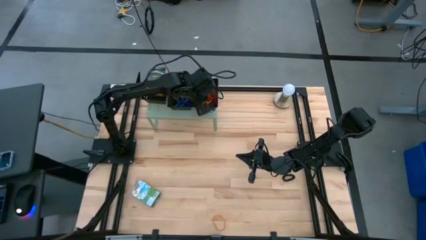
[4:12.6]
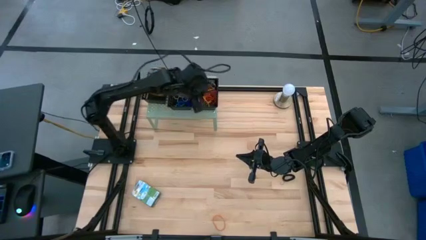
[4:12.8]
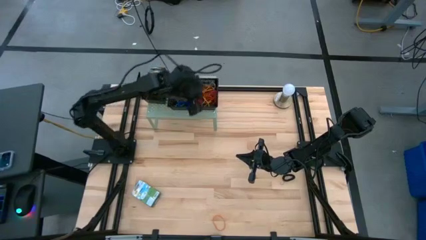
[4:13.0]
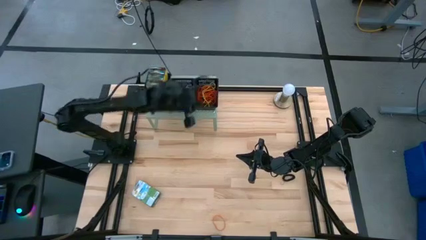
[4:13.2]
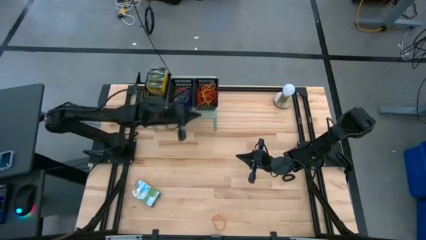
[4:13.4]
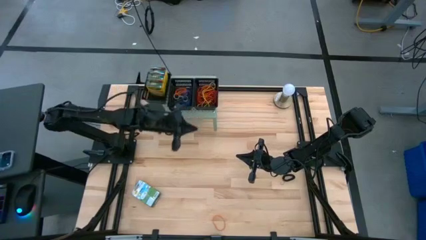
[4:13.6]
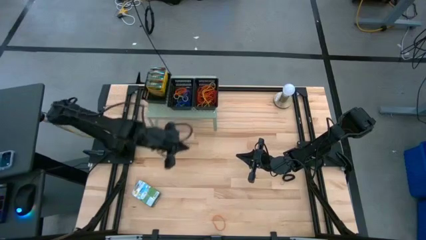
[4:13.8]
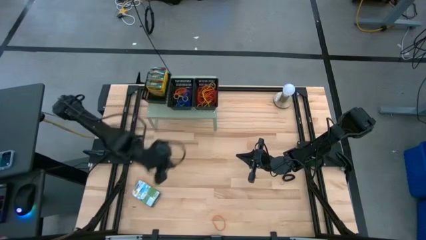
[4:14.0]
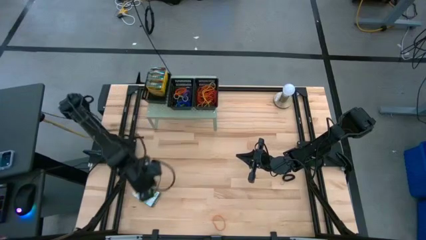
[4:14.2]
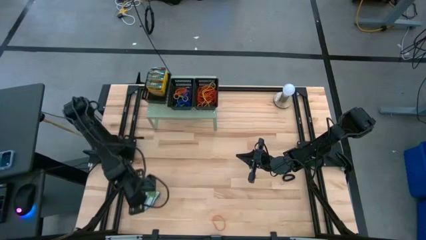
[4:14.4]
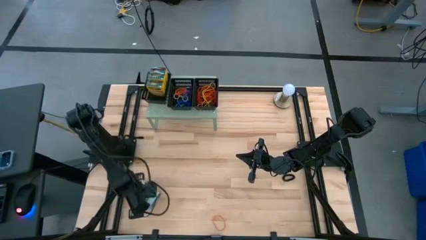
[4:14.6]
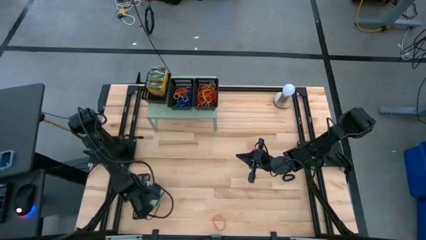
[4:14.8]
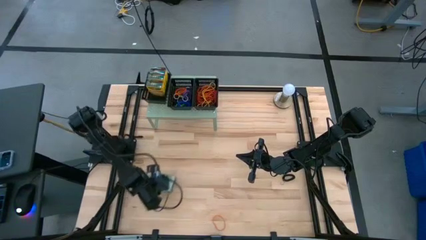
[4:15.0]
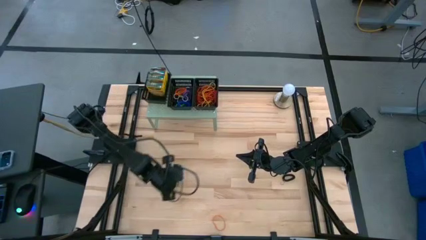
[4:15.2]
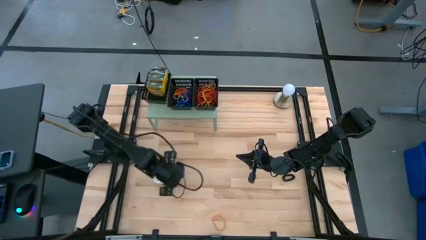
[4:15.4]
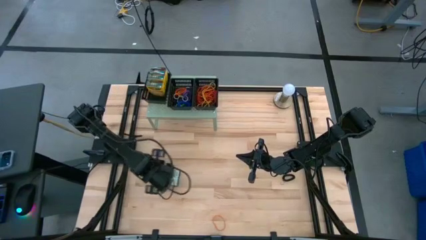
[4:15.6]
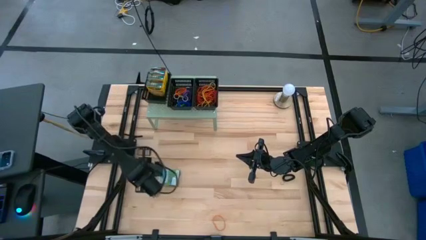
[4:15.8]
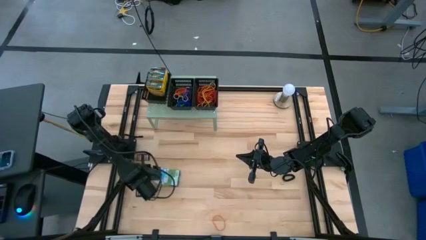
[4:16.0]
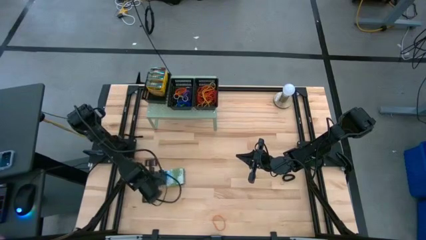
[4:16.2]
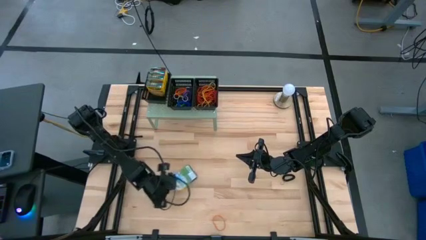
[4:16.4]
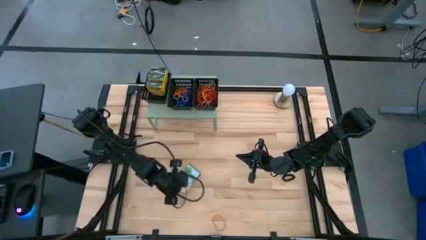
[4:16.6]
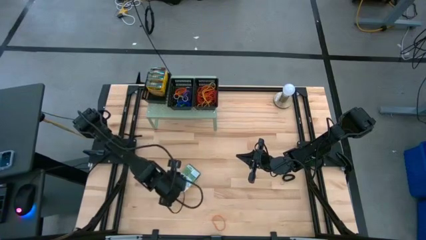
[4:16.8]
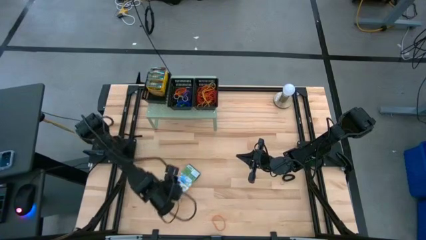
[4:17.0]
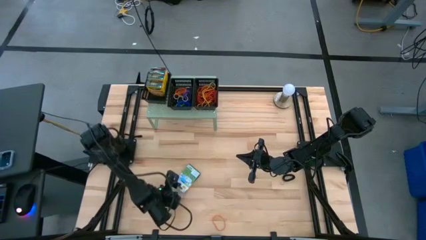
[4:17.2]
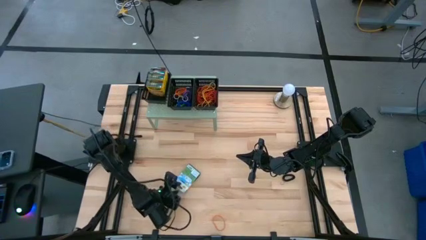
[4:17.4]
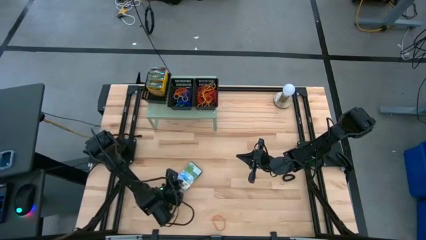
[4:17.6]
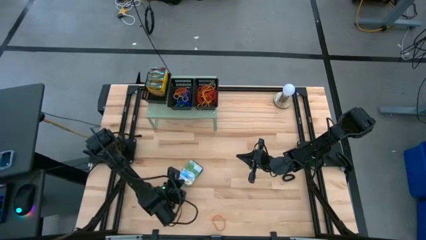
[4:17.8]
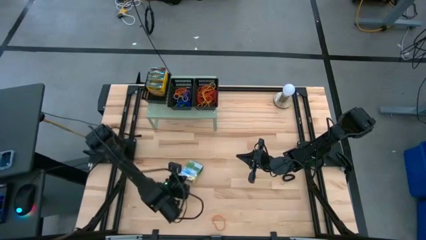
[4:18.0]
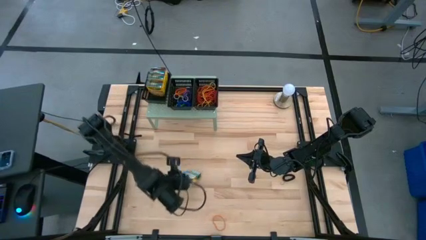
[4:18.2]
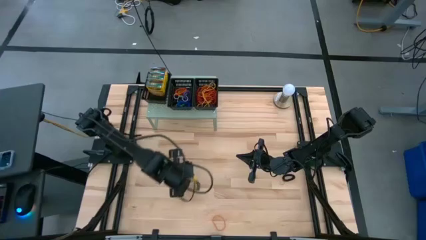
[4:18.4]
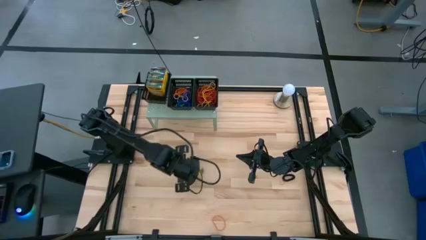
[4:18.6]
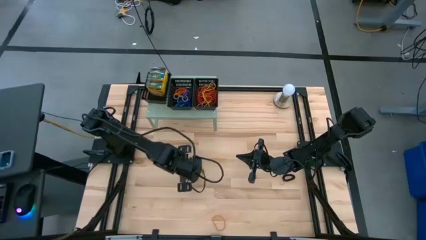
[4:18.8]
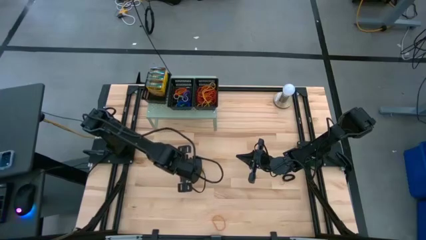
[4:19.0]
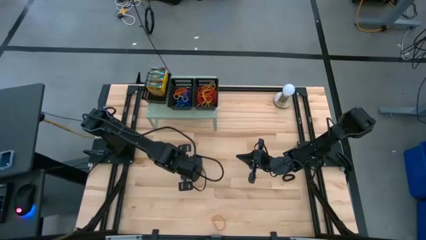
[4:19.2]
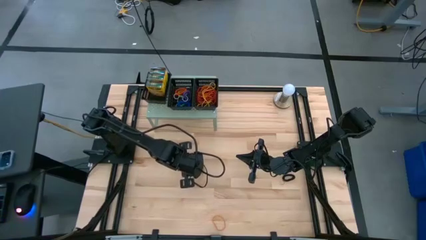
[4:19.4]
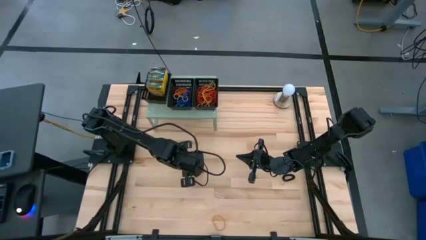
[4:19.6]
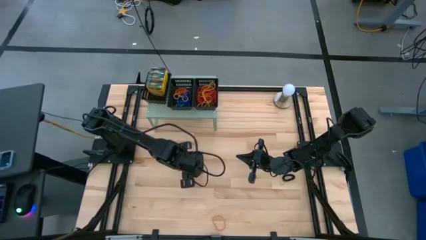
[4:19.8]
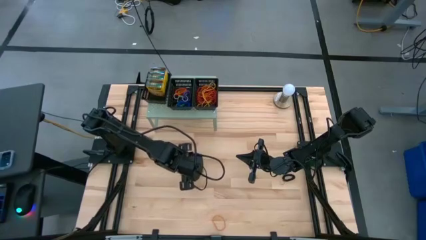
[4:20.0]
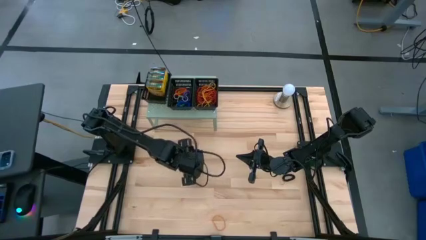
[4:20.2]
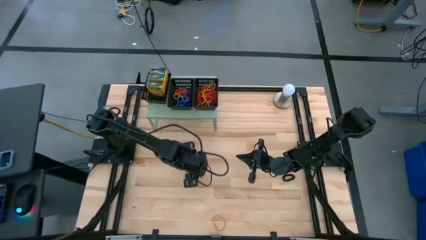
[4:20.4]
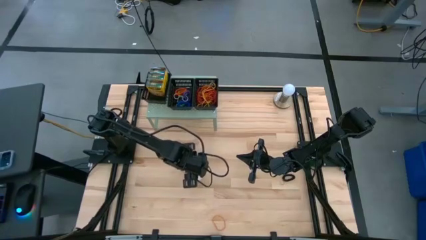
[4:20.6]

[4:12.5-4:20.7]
Task: Pick & Place Office Desk Supplies
Put the crayon box into left black bin on the shelf

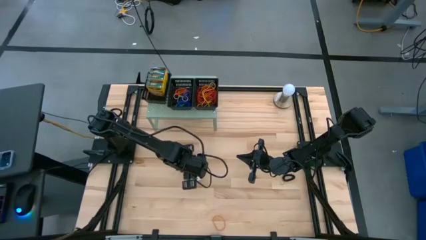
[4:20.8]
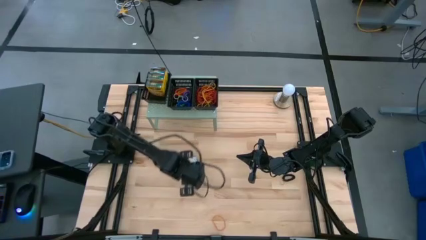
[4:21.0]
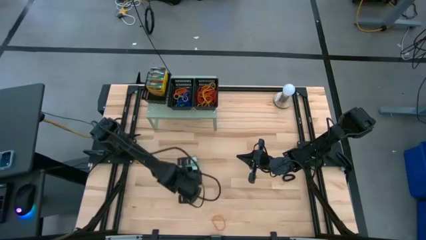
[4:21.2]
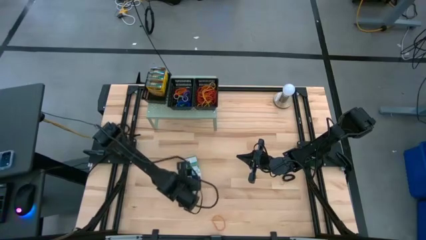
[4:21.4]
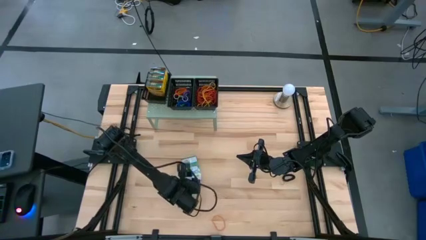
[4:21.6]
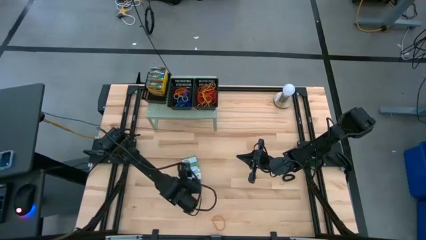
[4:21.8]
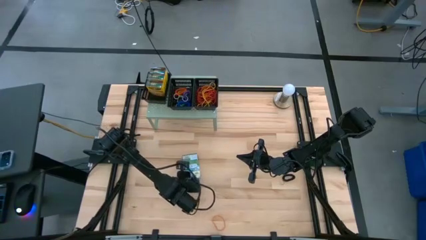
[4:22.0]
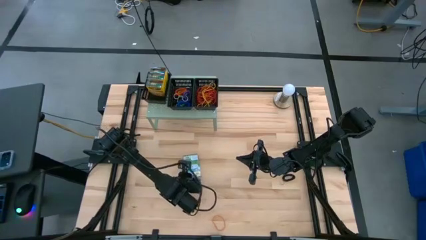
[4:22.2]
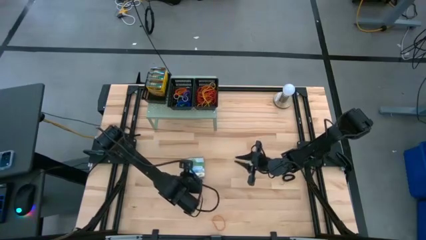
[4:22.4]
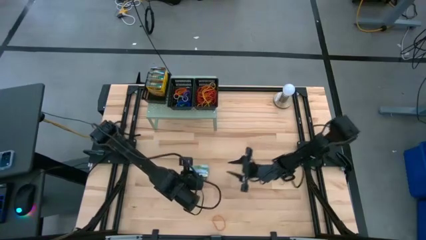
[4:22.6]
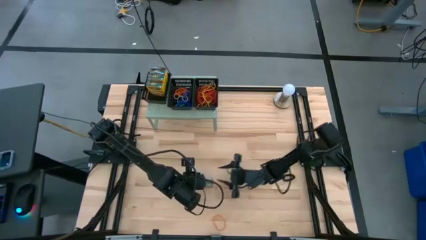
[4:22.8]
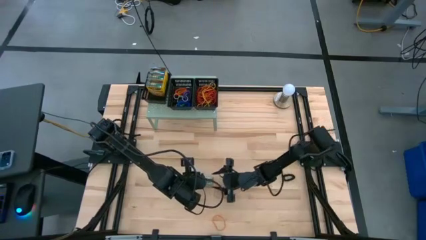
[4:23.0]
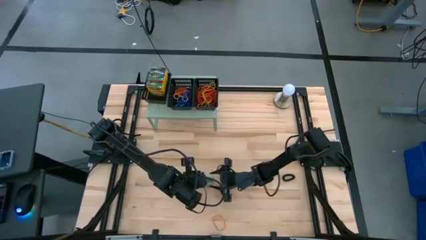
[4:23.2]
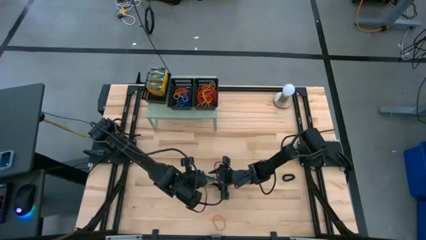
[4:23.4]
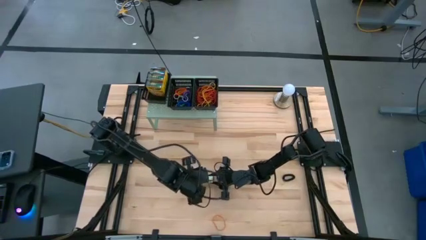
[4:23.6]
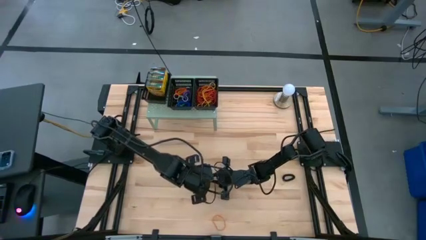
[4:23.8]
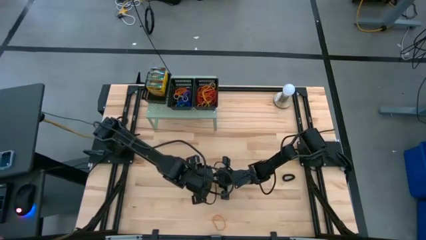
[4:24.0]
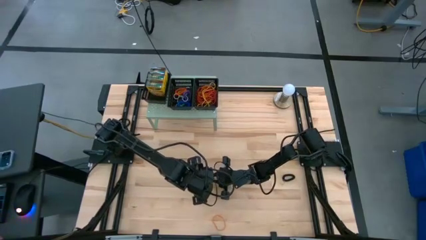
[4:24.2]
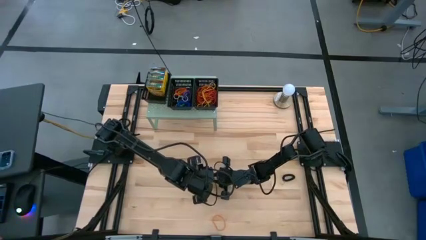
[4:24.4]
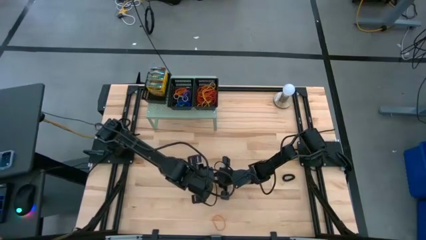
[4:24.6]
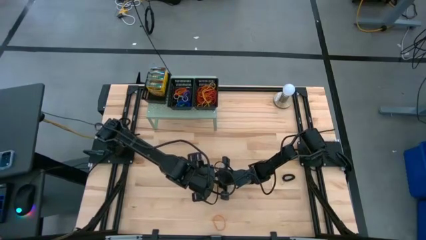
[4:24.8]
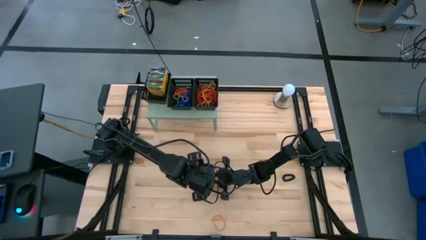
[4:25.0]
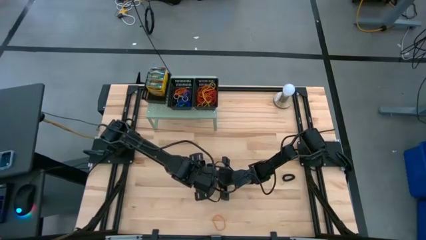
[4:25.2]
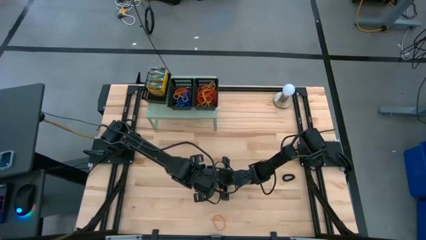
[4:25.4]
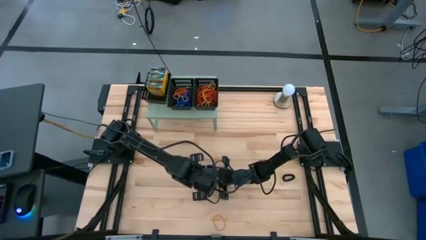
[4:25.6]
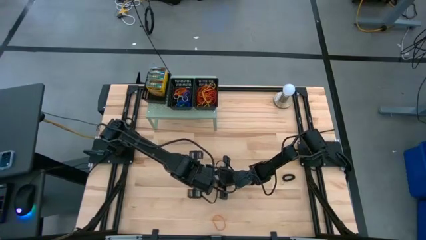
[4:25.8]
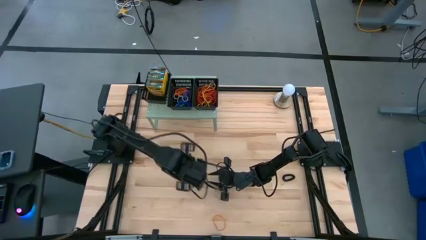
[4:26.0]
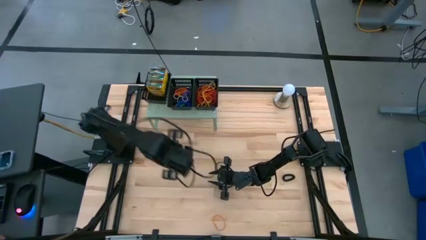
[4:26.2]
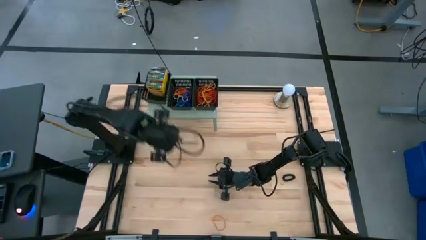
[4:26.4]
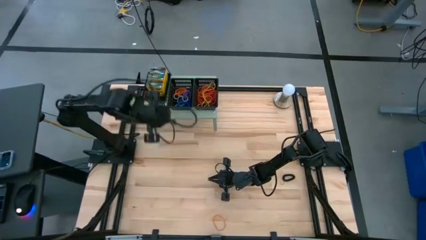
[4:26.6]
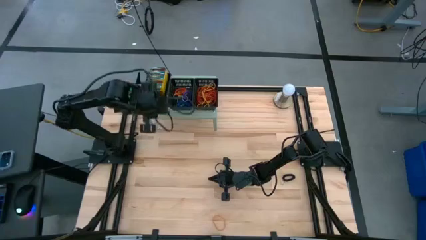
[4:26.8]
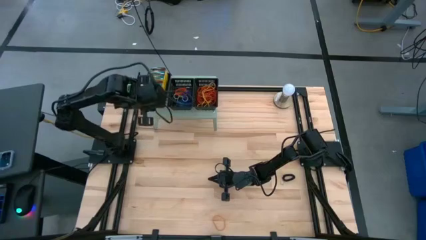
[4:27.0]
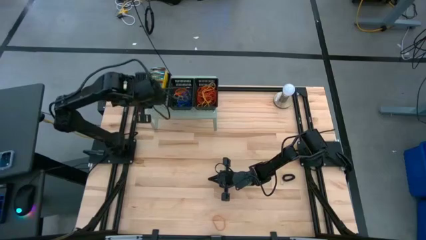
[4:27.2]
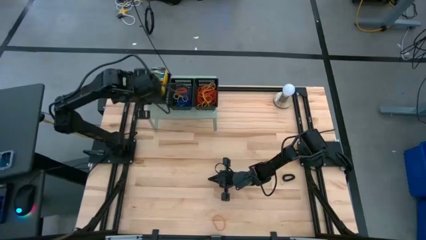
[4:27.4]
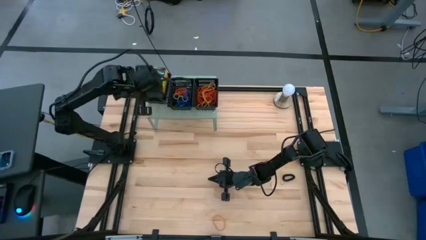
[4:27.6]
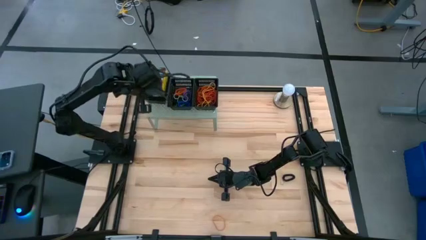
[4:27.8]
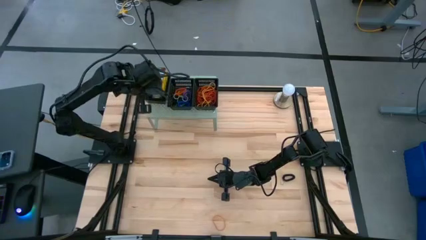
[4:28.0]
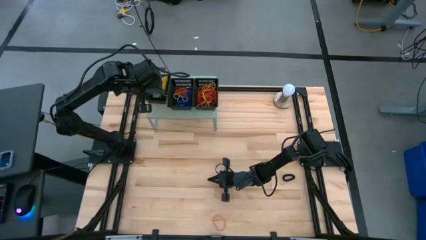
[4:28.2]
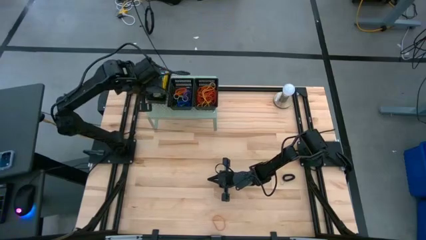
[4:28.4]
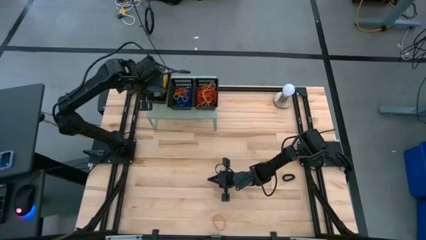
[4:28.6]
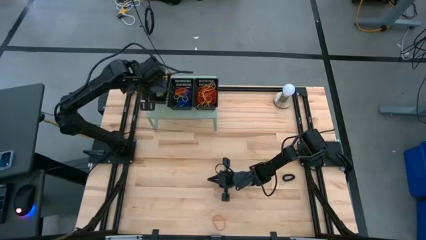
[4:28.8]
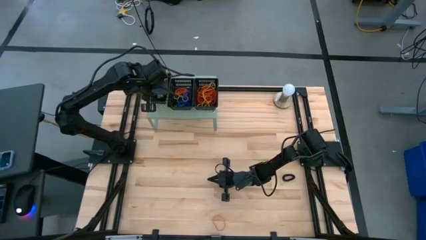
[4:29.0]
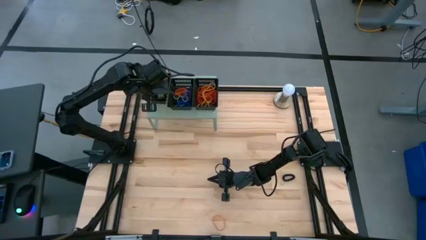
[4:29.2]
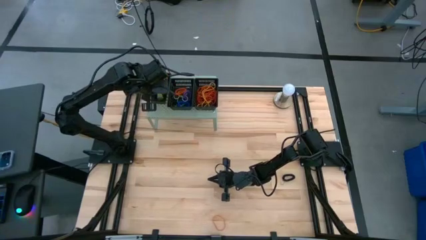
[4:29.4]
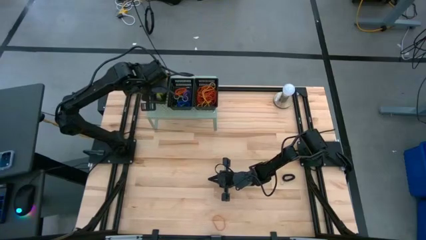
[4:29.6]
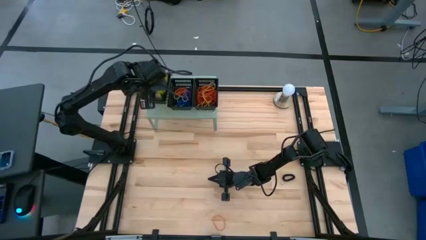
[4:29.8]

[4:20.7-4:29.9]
Put the crayon box into left black bin on the shelf
